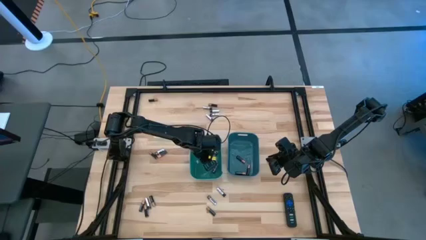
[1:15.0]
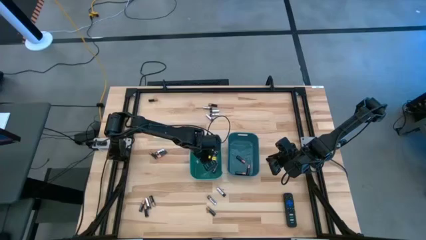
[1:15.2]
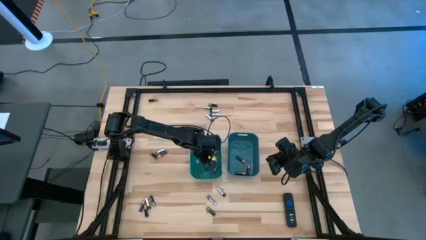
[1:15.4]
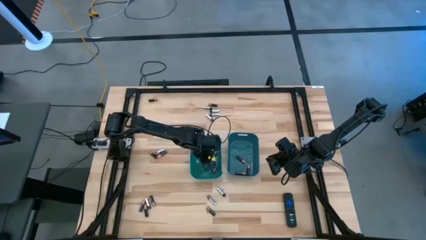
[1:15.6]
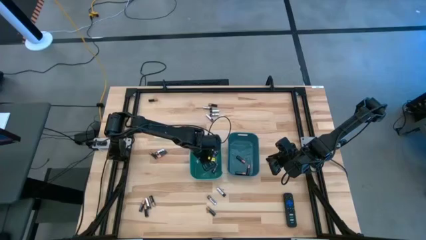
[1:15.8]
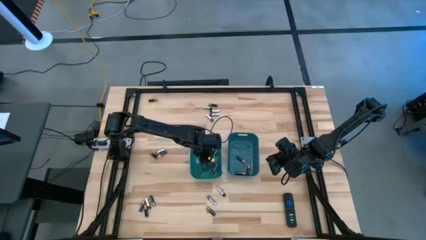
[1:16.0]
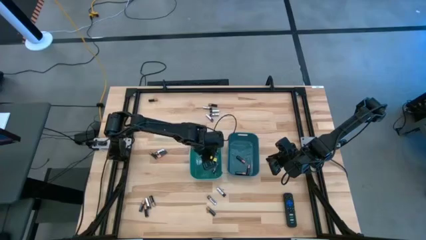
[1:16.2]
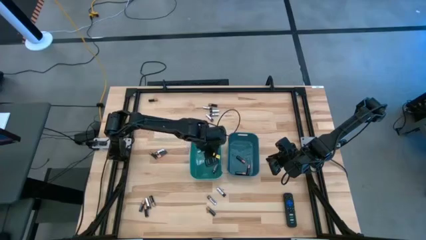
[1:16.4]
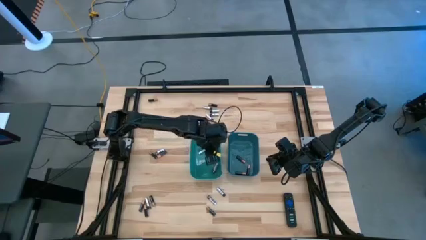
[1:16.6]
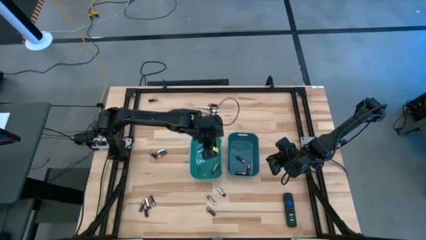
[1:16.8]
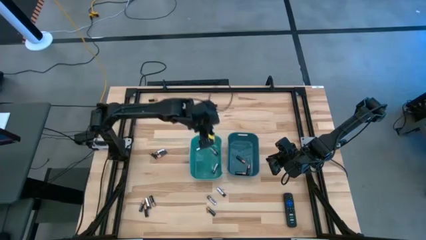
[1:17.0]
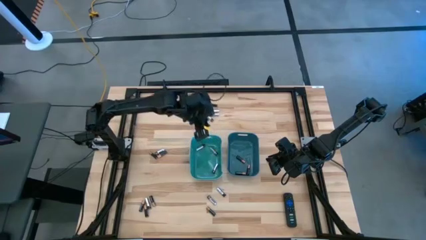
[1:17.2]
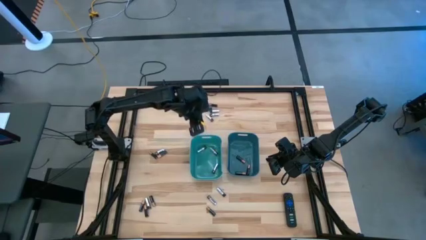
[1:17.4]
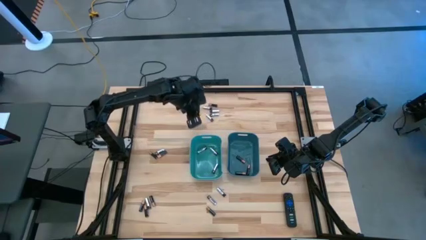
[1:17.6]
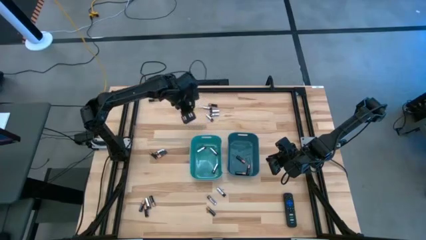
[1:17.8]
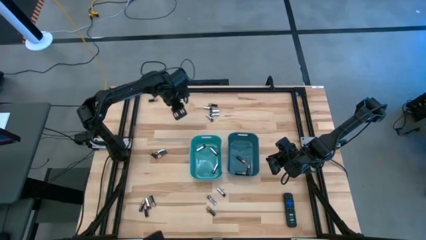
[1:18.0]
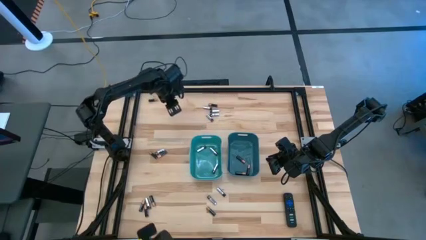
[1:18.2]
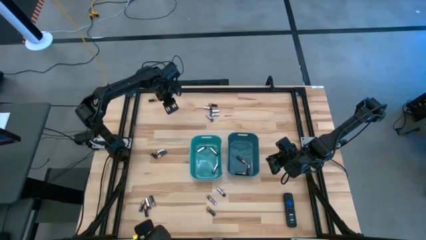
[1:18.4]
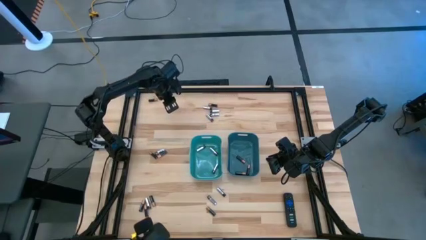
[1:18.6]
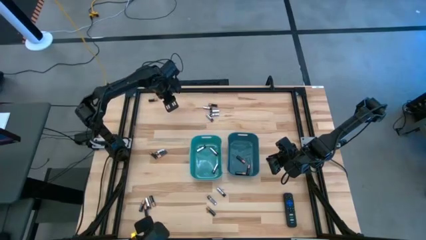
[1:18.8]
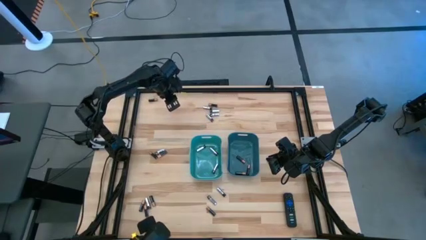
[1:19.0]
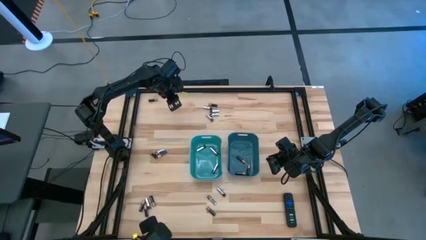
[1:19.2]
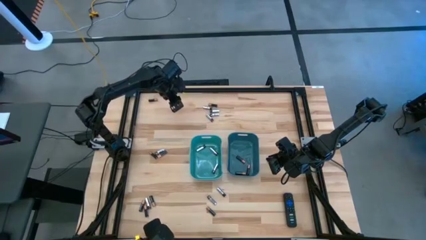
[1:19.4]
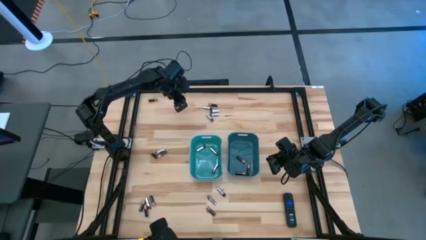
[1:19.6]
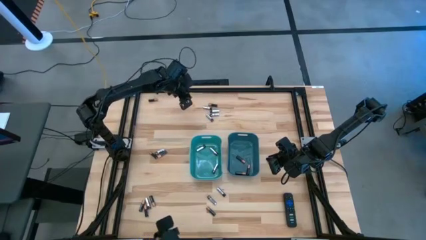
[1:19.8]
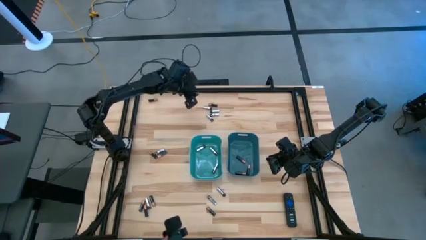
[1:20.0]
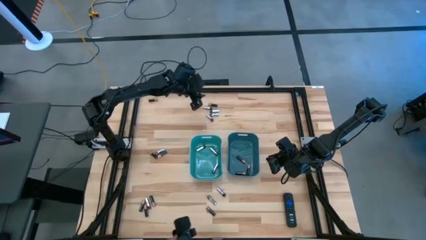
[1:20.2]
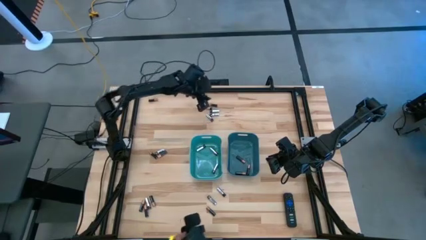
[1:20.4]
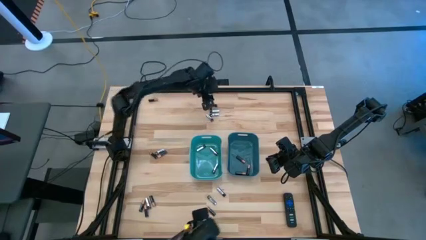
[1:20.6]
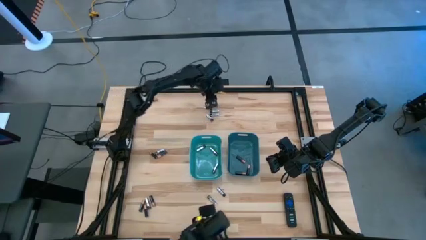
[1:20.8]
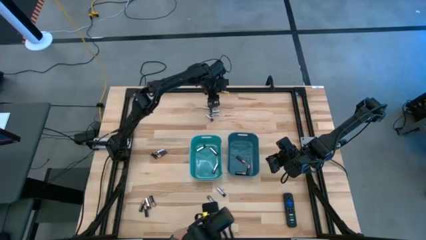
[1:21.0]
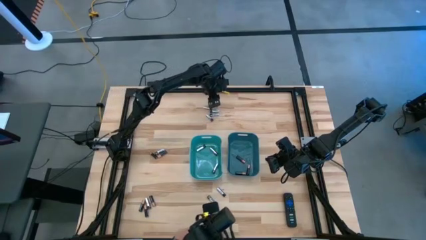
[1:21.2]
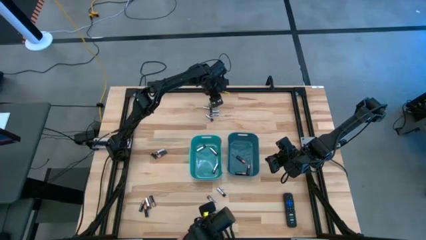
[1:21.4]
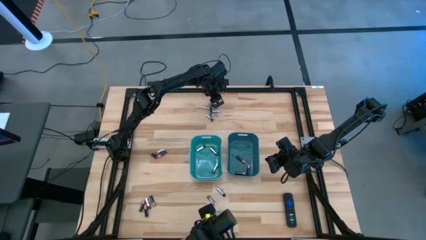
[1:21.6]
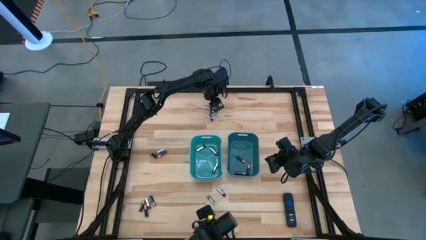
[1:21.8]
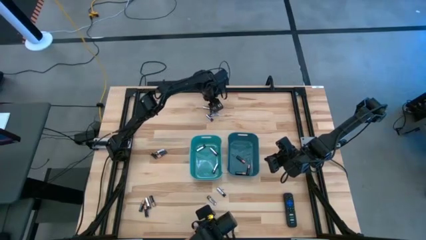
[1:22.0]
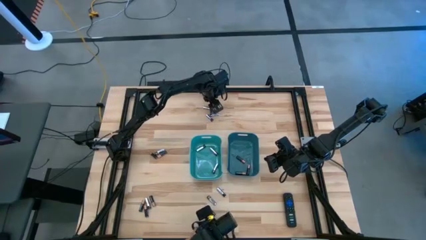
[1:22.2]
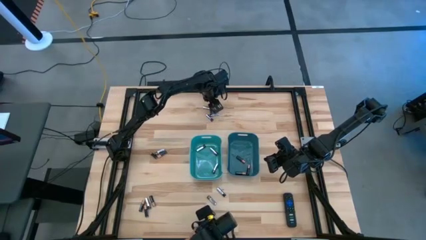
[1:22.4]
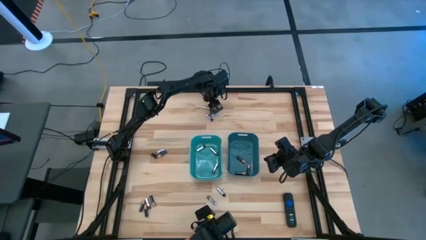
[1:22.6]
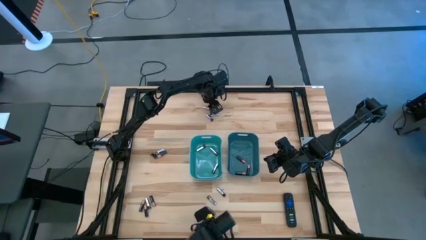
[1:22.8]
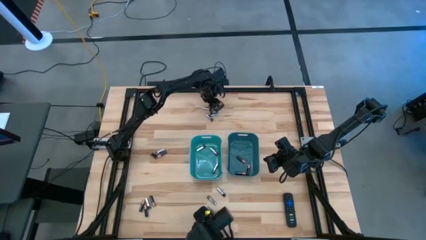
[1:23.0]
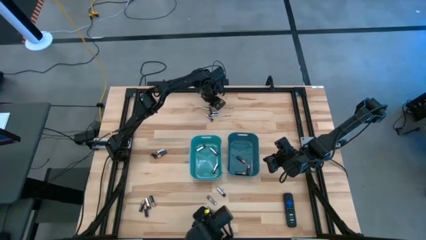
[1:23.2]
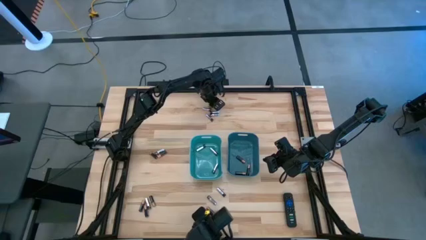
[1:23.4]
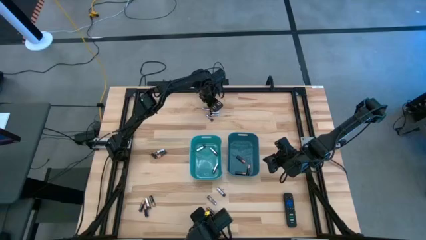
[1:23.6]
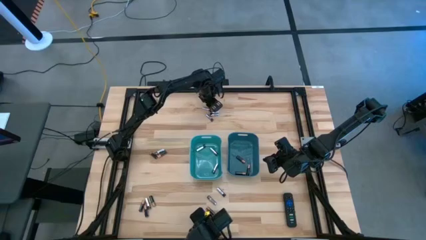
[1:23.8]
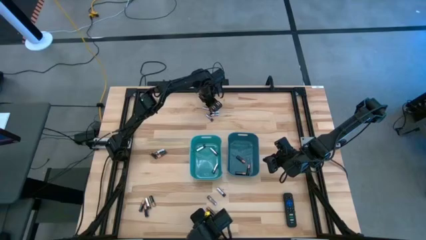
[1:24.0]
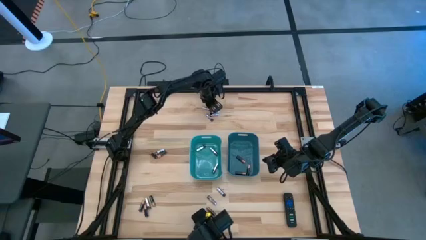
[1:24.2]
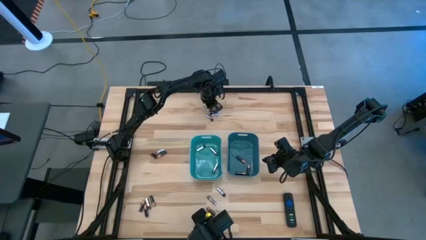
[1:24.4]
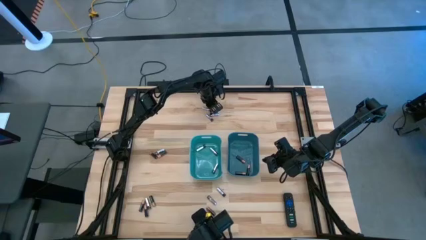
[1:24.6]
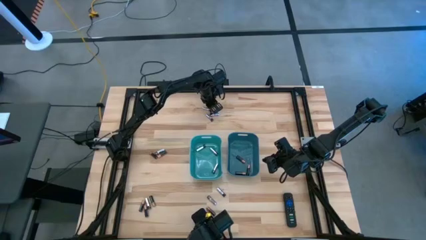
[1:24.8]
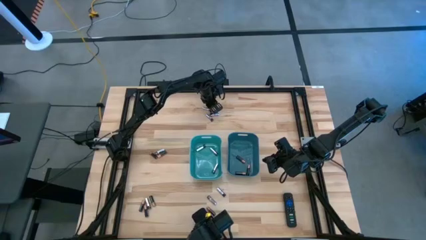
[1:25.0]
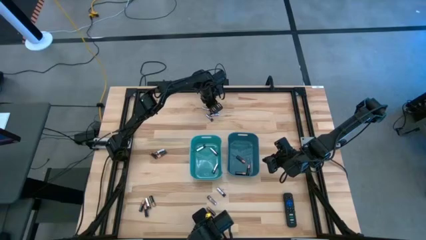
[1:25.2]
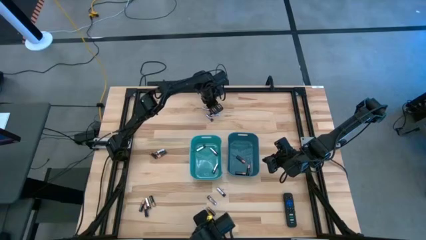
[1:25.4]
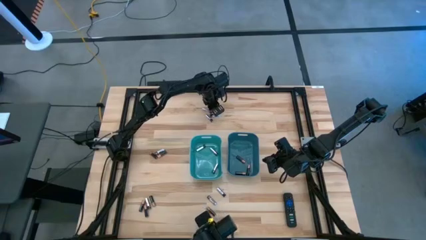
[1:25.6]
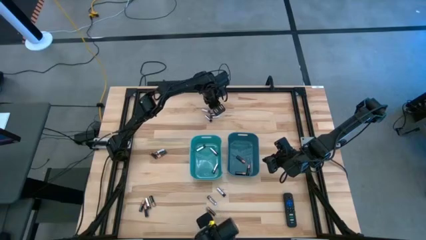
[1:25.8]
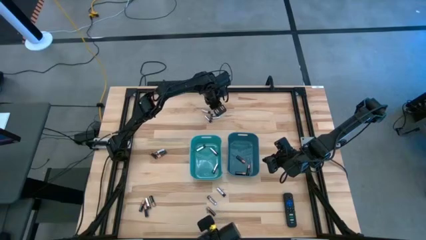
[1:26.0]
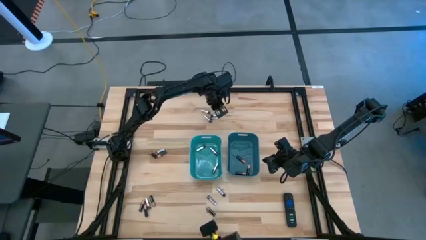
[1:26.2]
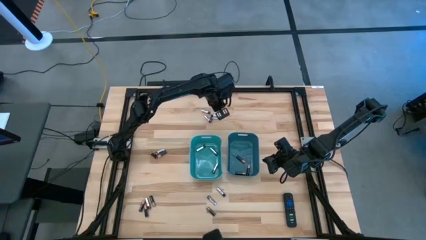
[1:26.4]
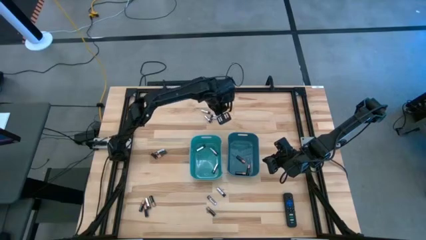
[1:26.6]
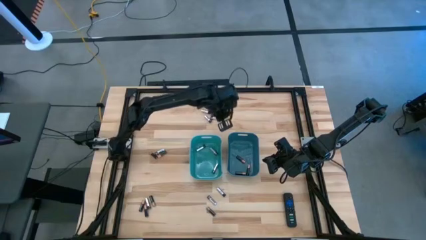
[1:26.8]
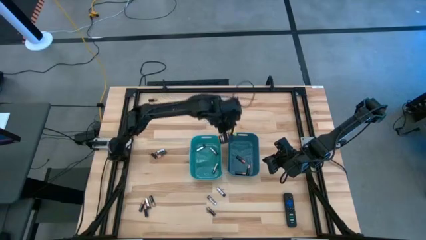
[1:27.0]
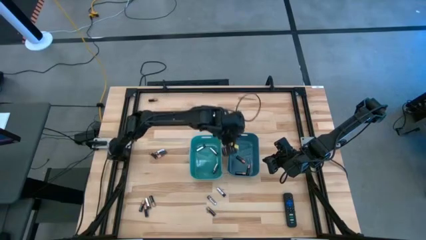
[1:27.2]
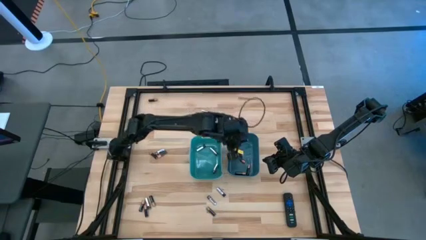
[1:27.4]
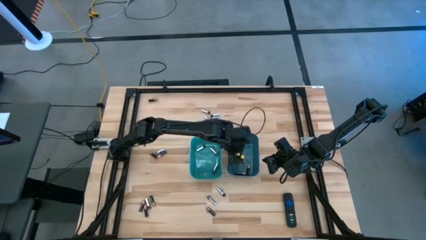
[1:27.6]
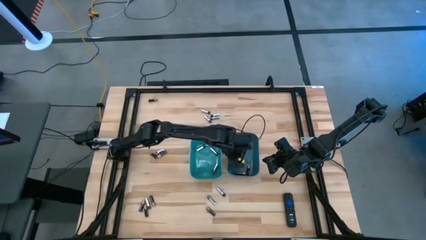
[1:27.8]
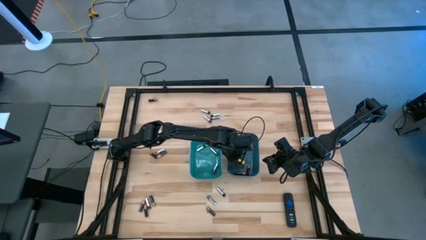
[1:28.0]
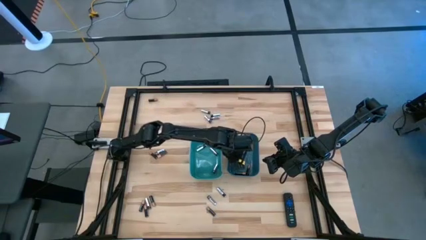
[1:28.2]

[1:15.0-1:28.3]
Task: Sort batteries
Put the black battery into the blue bin
